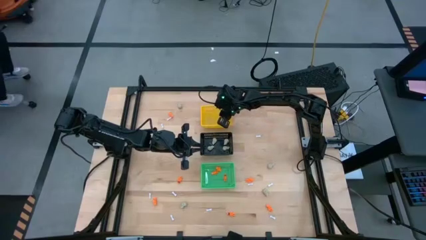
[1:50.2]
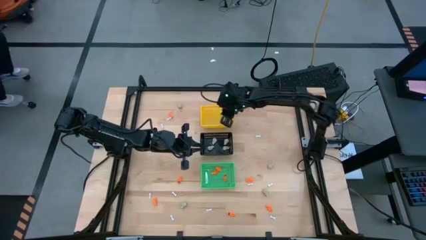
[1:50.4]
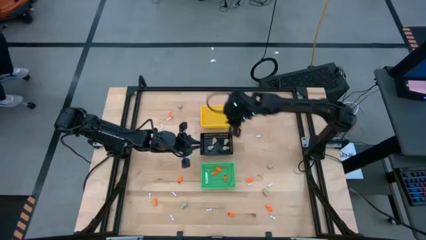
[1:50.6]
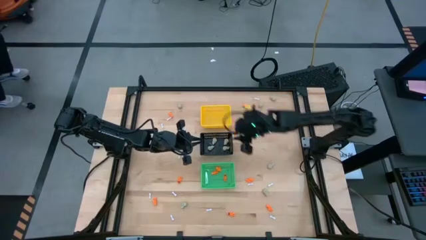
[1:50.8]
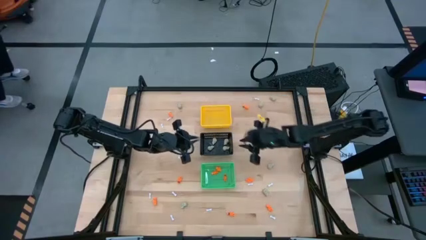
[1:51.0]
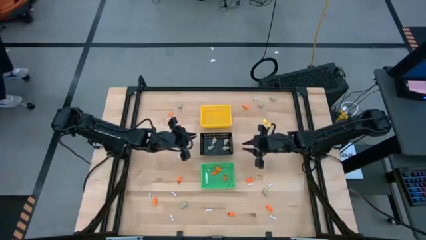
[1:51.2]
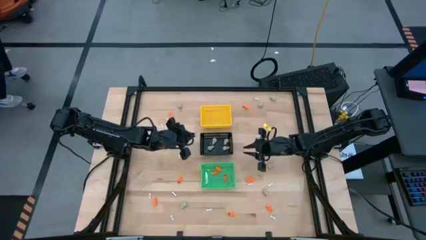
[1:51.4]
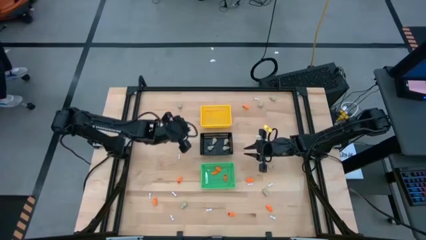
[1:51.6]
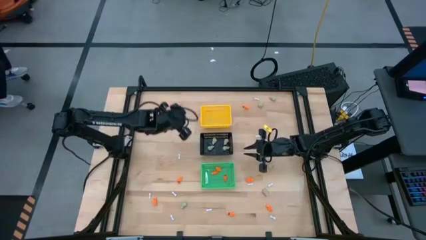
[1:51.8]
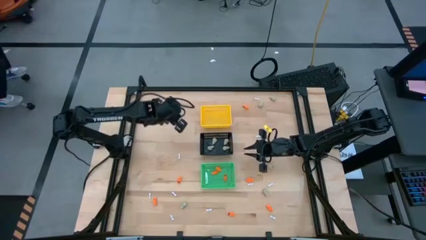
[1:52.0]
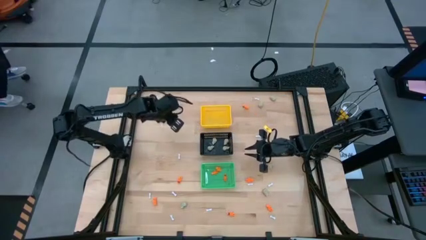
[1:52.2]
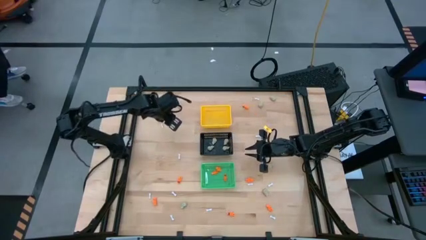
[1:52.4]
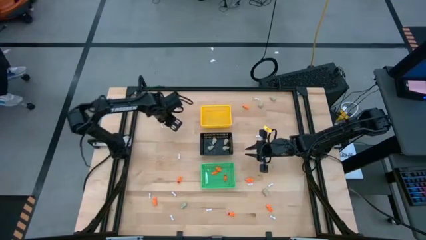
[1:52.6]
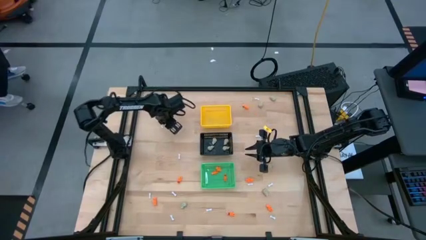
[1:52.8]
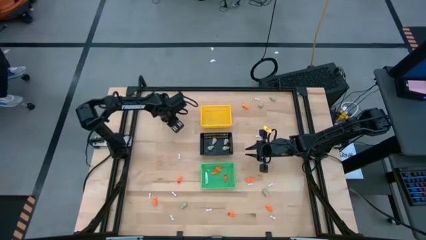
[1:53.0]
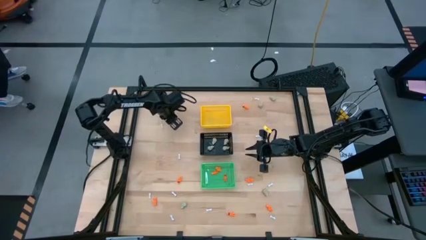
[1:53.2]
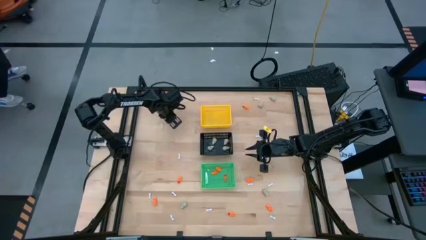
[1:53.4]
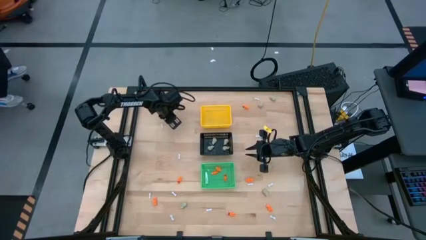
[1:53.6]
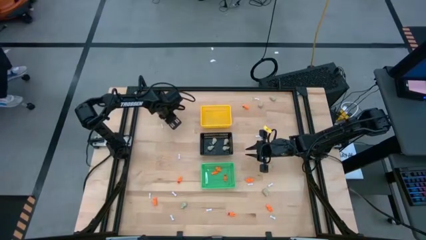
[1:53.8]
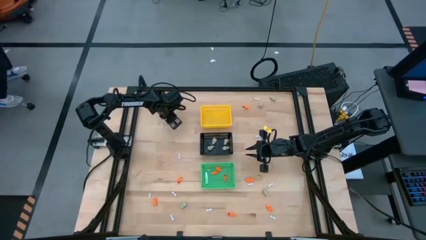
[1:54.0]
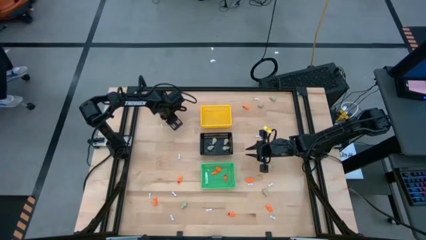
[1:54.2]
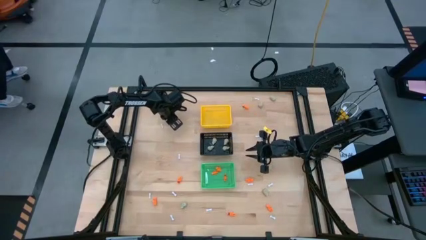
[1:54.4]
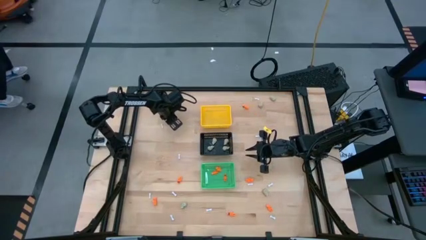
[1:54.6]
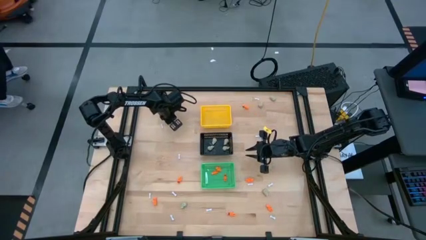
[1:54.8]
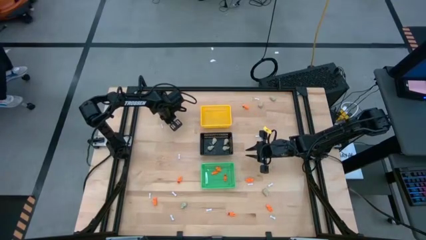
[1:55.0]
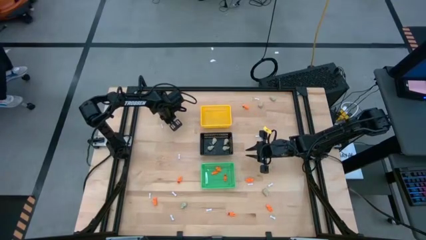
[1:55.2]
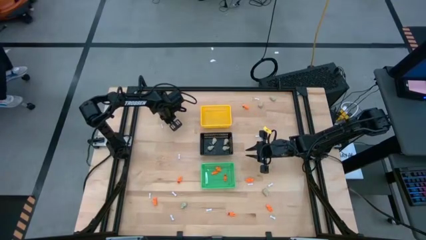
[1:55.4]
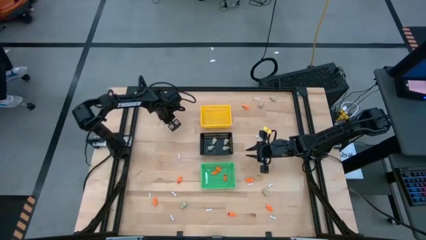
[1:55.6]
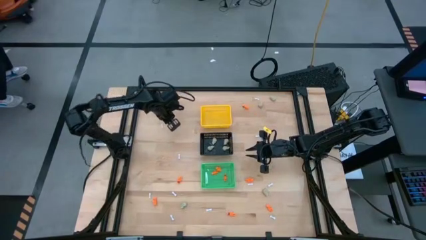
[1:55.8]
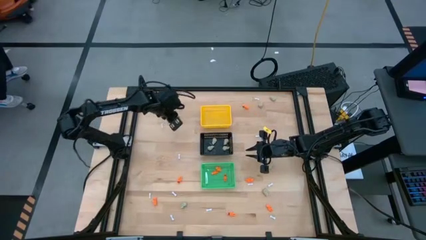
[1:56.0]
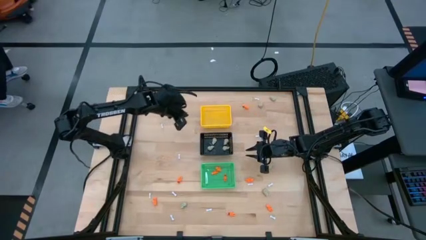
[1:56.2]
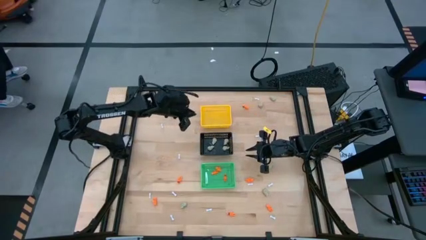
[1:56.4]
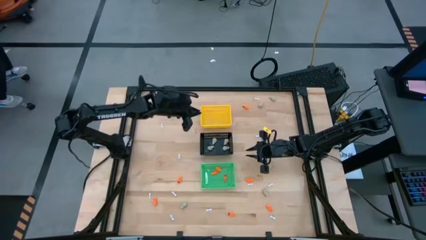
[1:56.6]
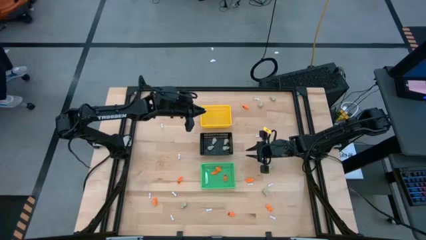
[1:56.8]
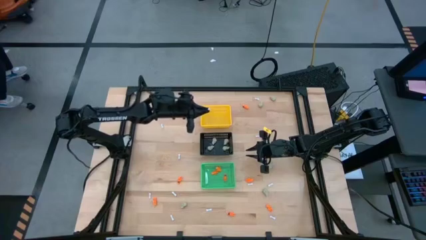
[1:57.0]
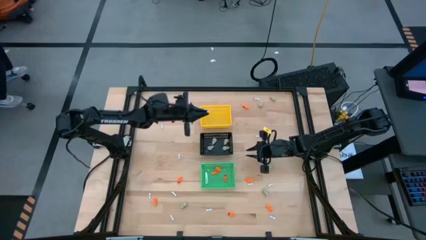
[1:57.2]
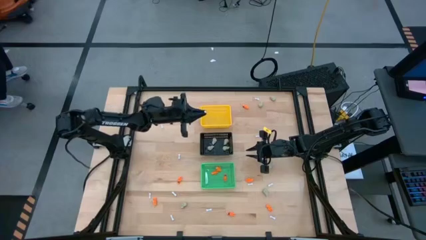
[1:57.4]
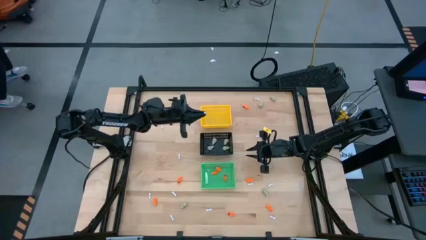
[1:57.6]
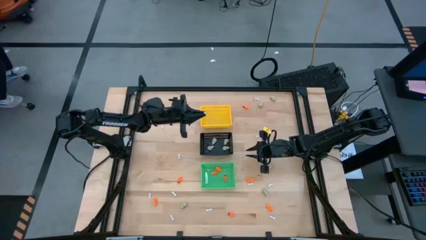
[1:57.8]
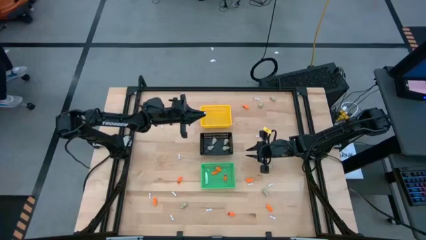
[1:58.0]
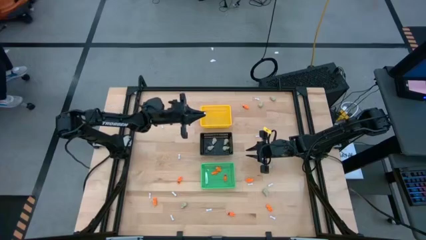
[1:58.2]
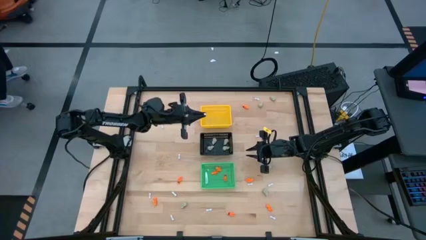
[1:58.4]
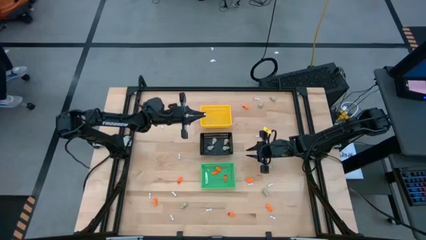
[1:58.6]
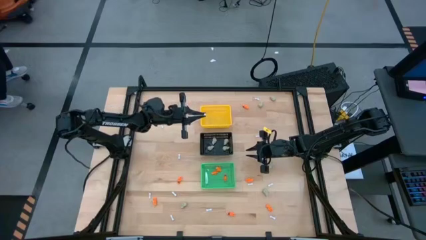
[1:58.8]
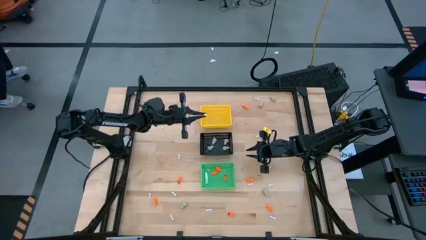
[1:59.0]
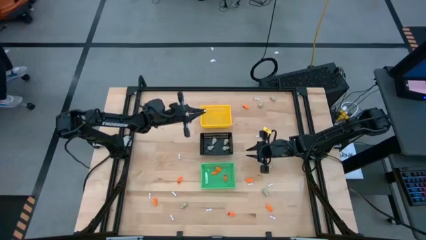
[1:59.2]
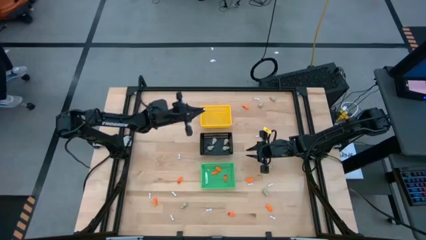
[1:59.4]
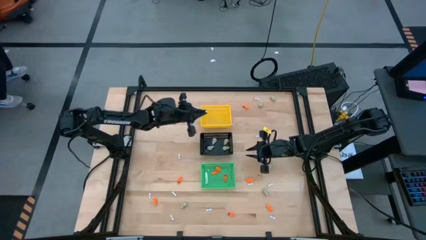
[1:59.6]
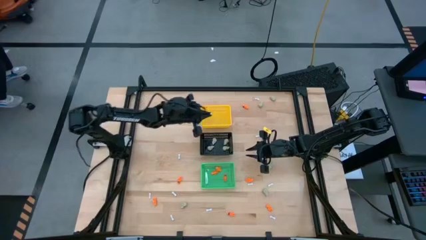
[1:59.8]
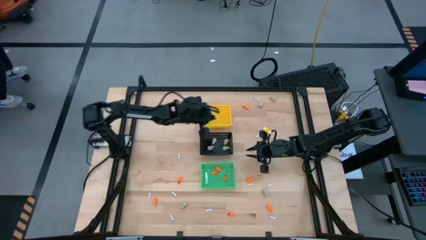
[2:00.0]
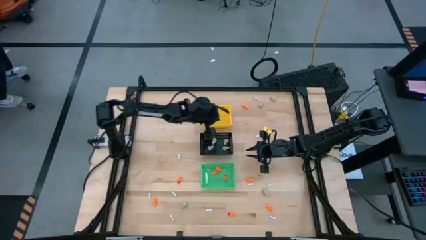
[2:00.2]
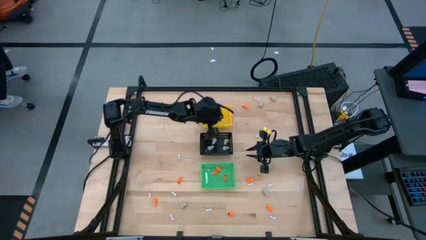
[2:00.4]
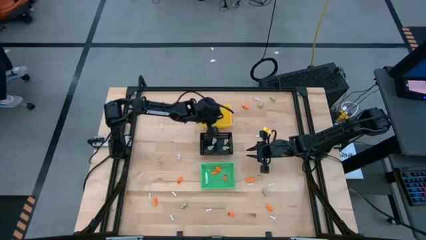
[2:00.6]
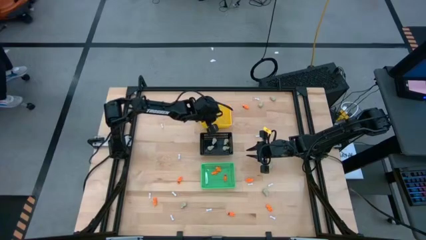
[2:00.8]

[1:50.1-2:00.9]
Task: Sort Halloween decoration
Put the white bone toy into the yellow basket

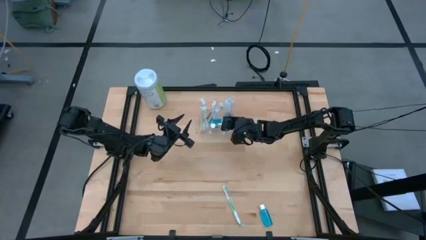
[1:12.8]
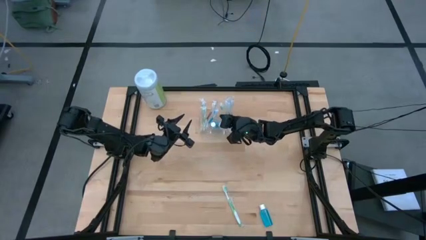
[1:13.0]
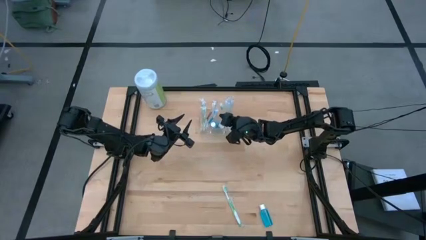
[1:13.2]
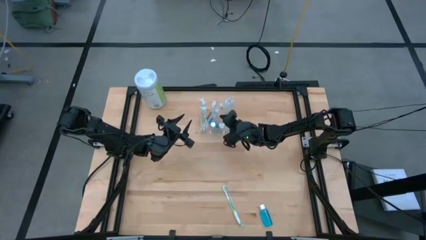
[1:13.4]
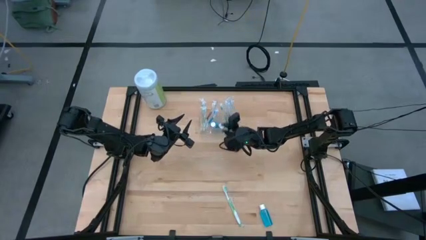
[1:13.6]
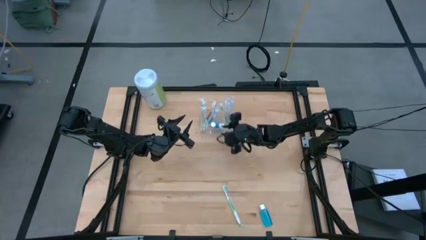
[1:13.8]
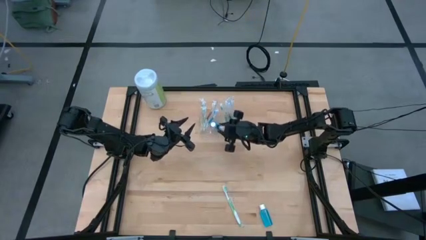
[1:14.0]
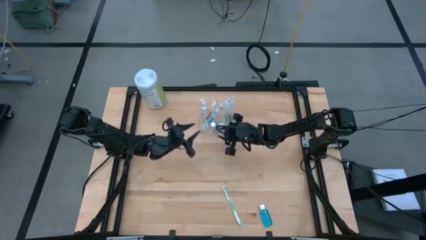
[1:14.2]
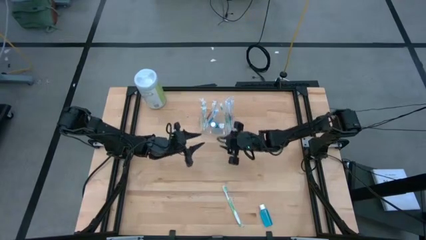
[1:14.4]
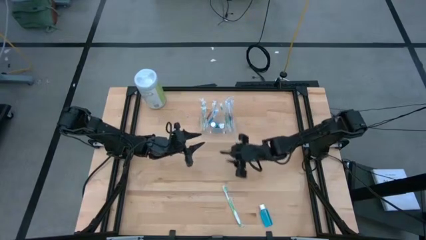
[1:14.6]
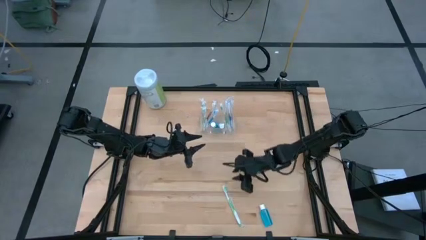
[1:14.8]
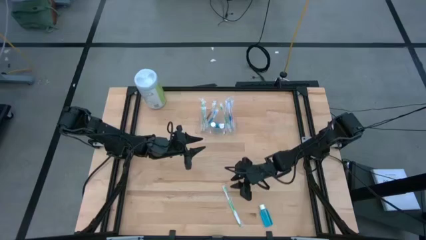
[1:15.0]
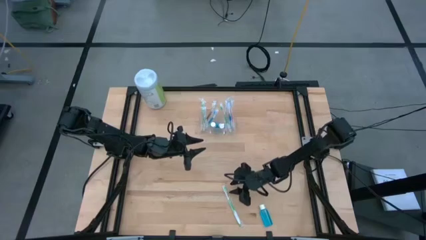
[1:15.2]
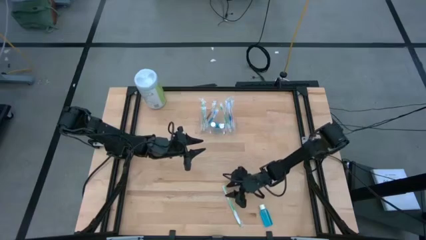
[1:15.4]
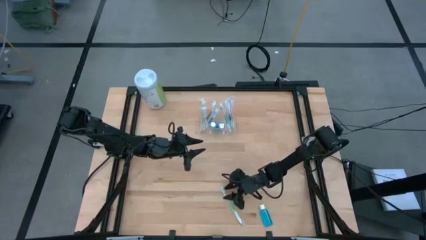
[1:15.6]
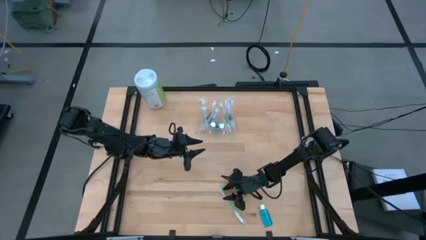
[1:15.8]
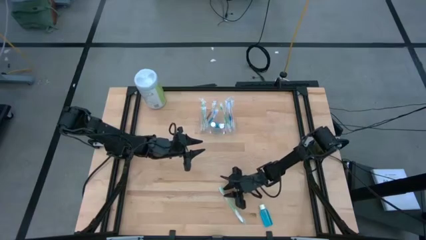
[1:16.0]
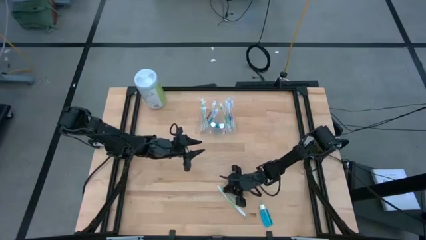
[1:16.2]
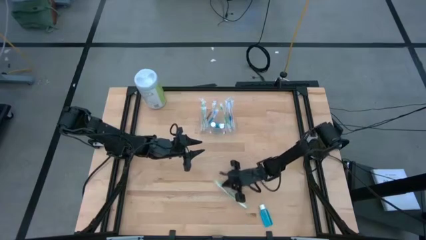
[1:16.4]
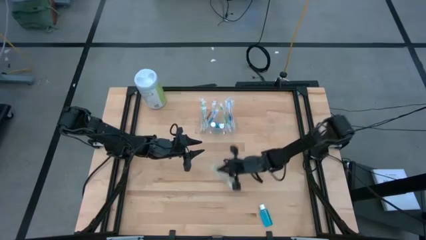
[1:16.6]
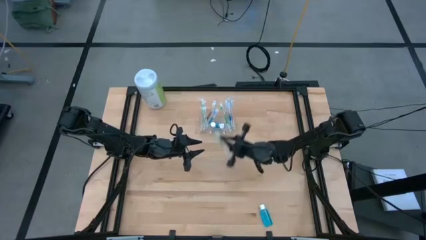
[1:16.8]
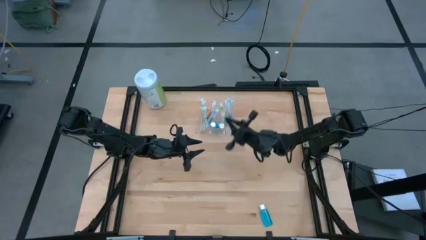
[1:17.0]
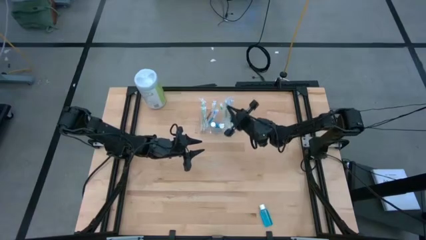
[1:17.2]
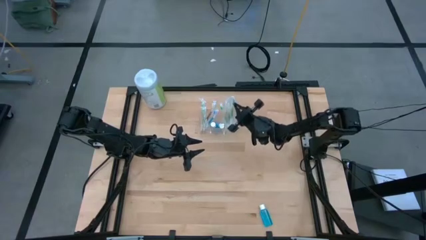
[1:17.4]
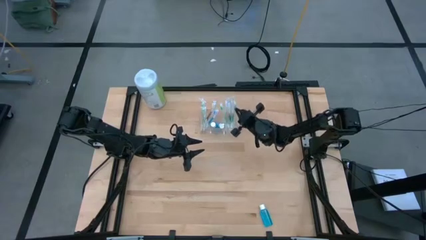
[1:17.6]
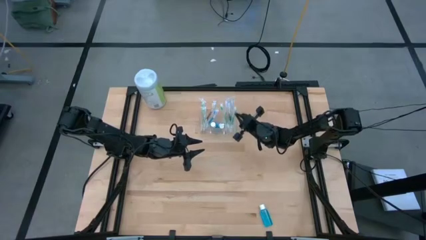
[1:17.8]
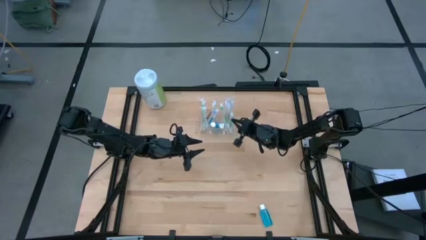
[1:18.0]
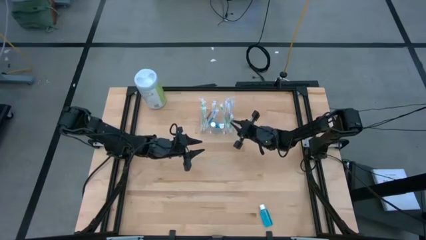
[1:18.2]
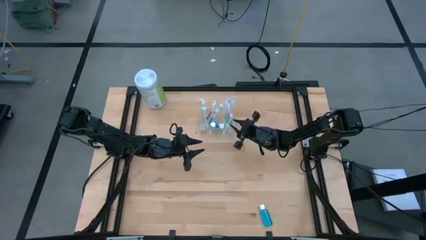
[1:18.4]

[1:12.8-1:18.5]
Task: Pick & Place toothbrushing station
Put the green toothbrush to the right of the transparent organizer
